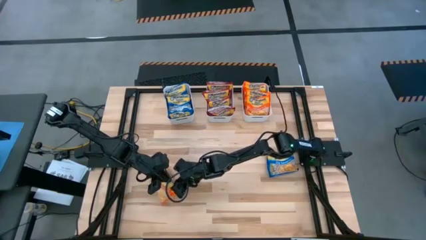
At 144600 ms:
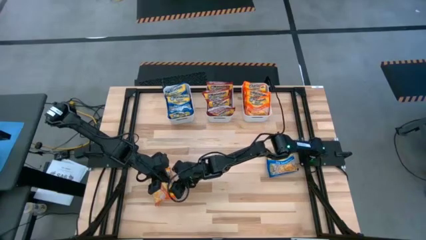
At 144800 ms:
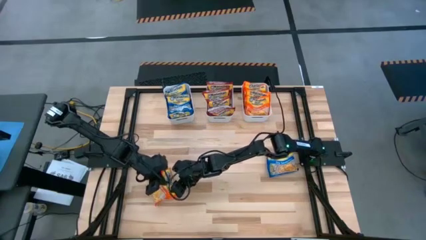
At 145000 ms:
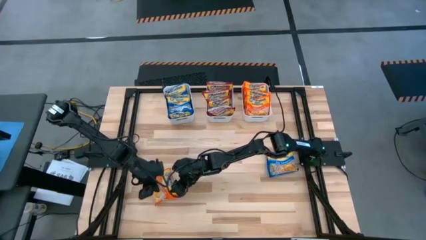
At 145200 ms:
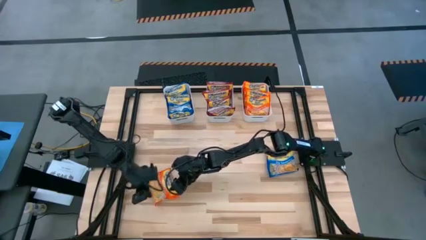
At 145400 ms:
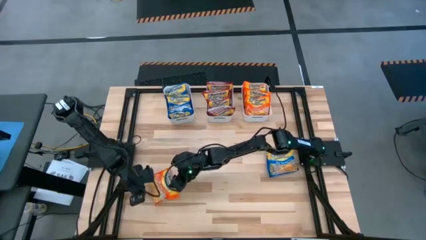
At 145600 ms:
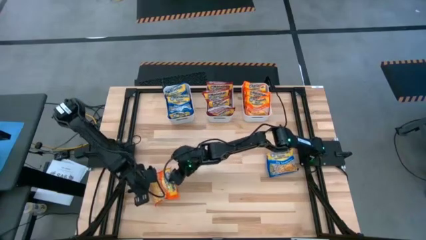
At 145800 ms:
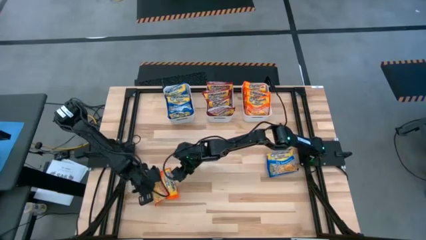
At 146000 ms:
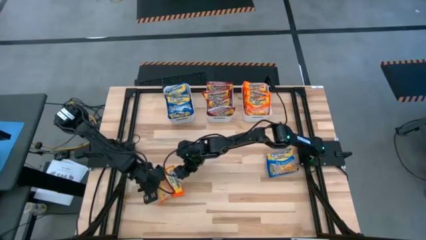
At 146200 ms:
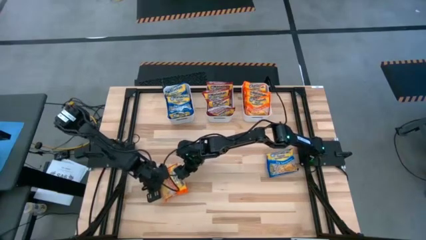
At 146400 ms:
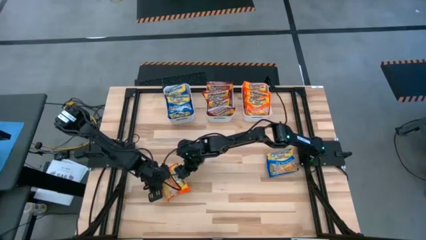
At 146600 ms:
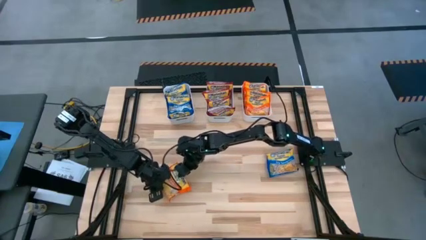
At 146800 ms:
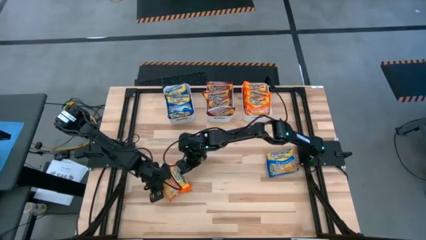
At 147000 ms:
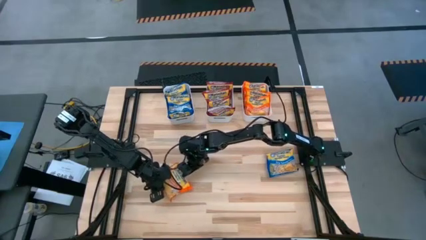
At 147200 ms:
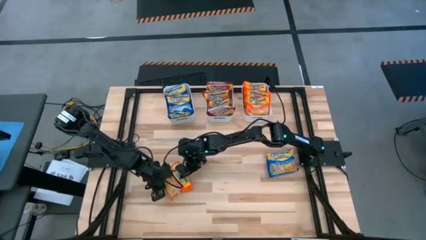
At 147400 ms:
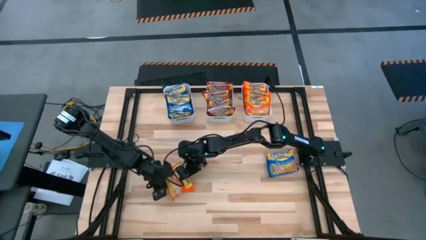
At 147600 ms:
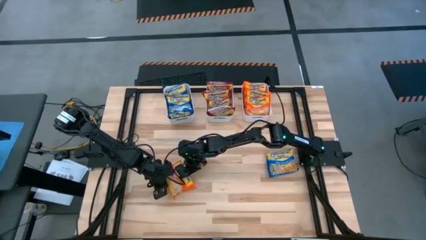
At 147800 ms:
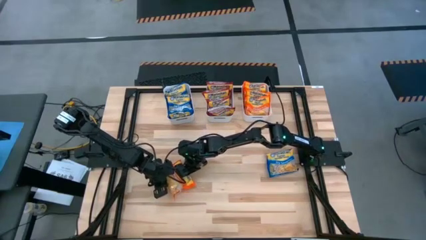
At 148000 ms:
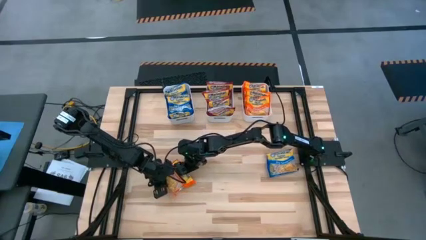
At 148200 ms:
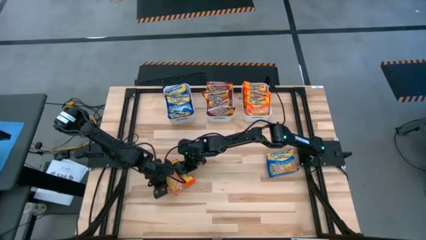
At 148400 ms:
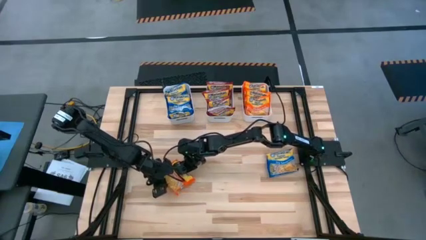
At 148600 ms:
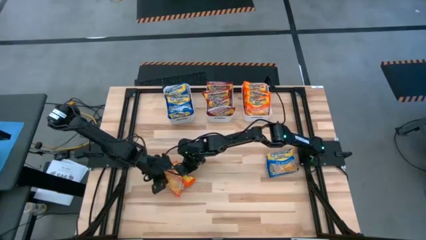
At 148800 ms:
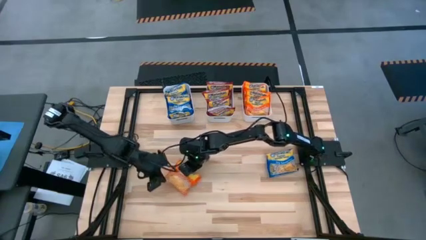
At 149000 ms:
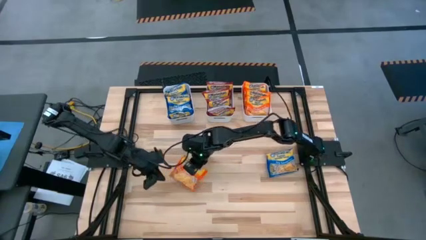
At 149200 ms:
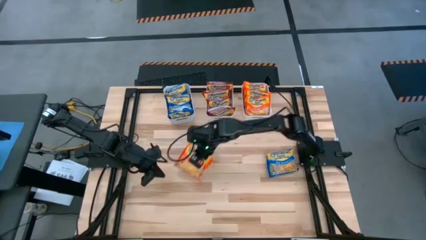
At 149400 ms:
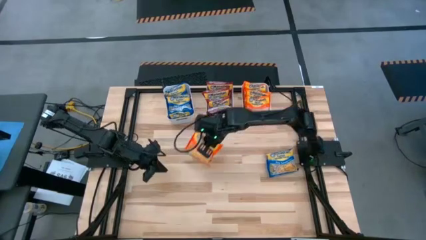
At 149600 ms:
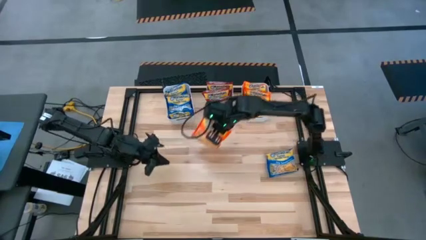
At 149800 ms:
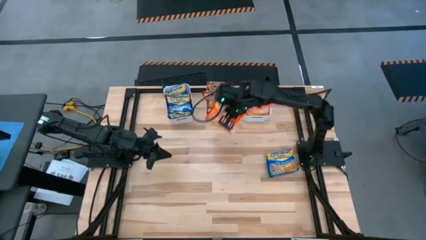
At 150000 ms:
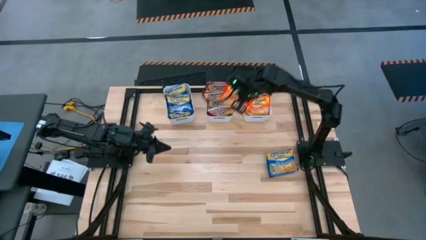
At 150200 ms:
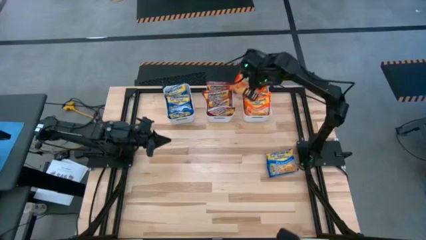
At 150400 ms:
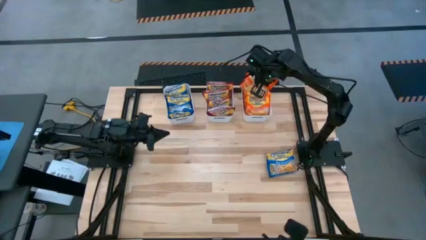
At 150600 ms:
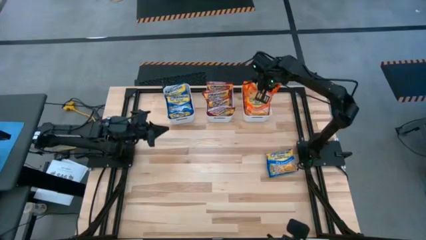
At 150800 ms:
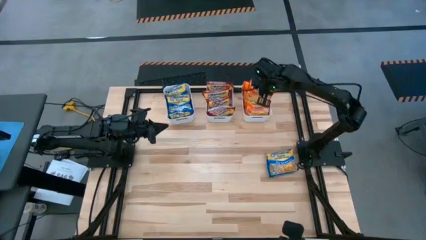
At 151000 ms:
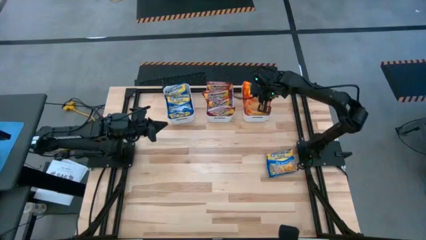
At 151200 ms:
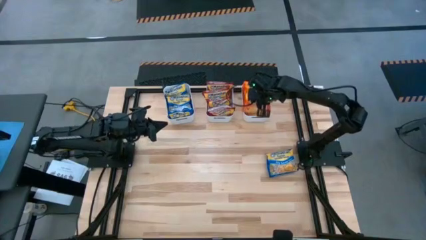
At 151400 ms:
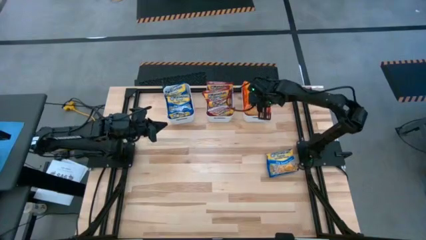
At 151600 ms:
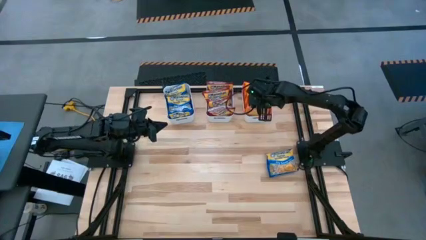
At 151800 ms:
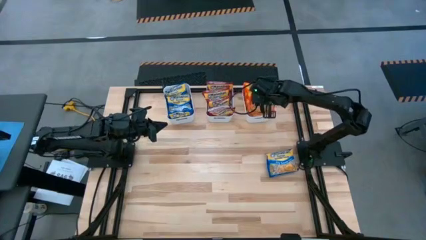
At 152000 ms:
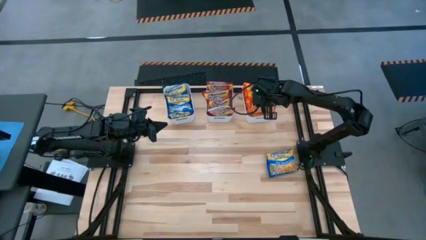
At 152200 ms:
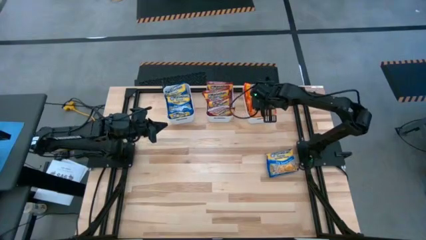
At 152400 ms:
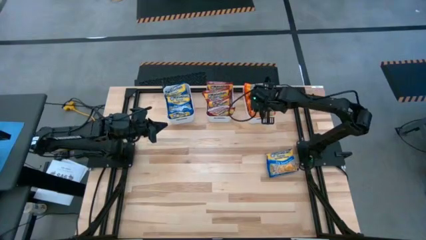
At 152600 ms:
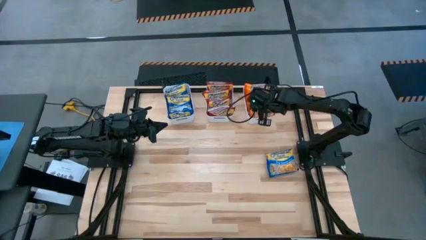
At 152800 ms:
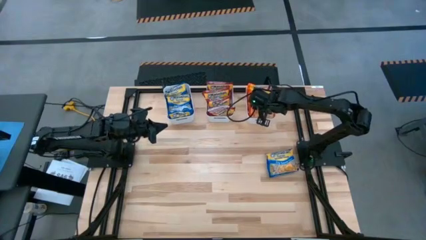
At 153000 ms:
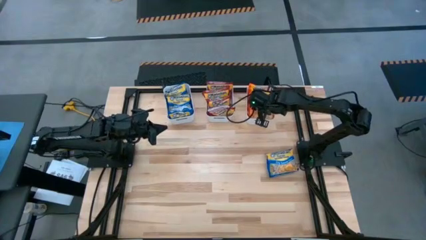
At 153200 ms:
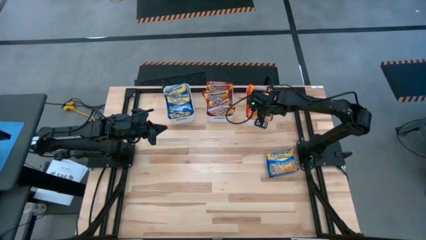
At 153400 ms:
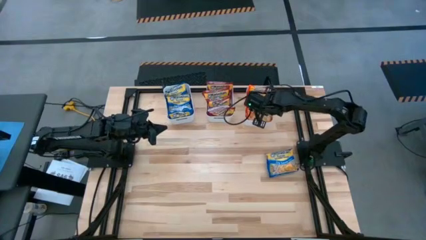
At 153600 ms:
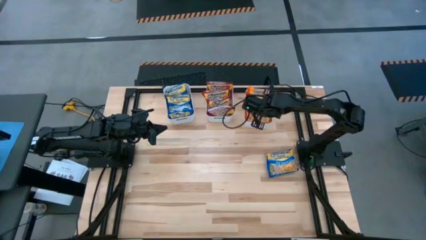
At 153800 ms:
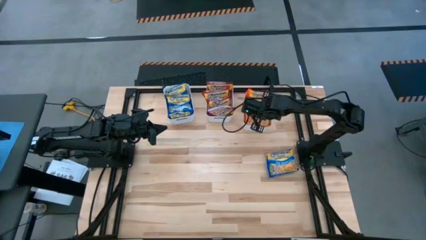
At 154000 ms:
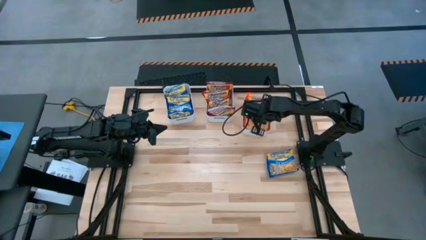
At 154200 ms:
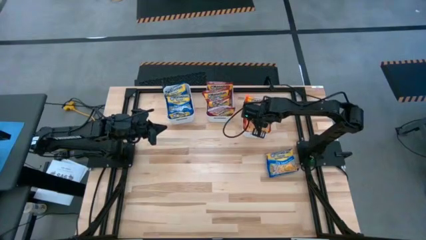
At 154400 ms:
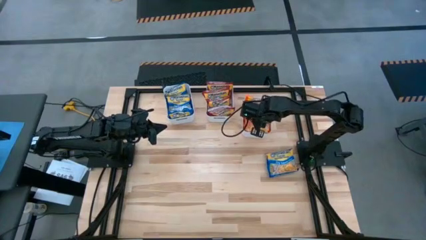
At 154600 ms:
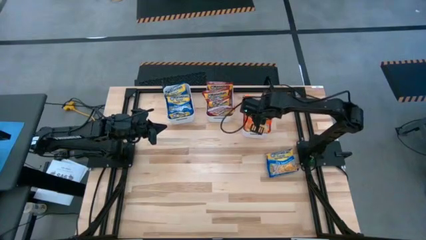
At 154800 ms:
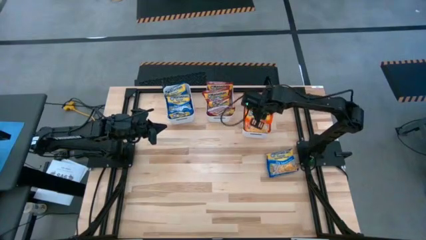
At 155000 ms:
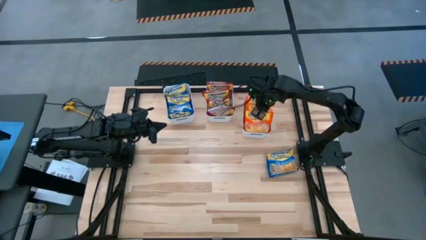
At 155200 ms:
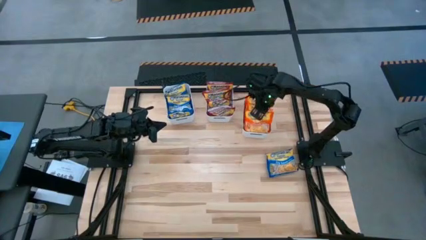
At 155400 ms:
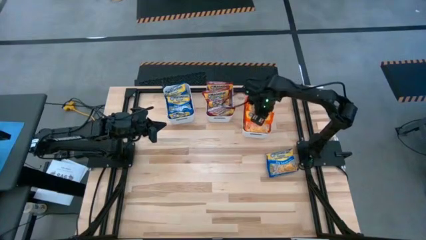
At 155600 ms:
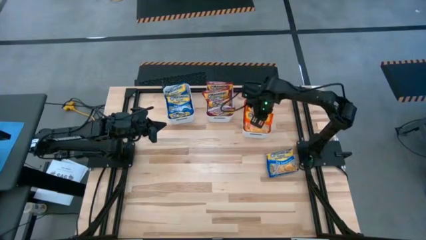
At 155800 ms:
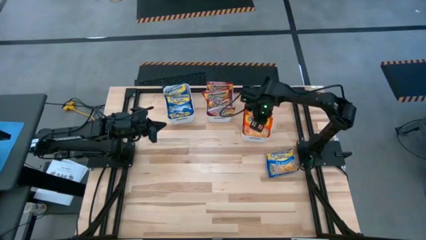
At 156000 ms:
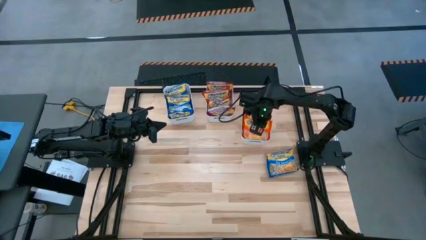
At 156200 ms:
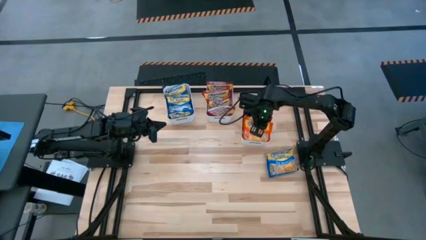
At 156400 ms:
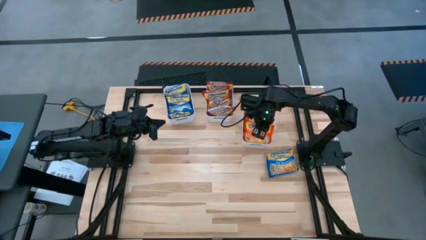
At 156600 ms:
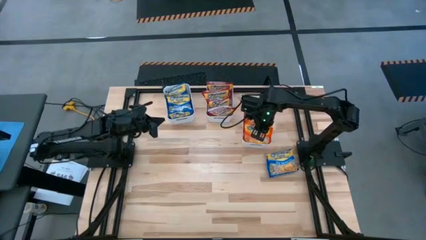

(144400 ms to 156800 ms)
Task: Sort Maruchan noodles
Put the orange noodle pack into the right white bin

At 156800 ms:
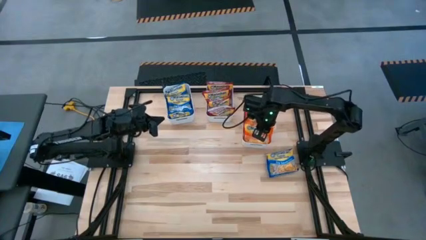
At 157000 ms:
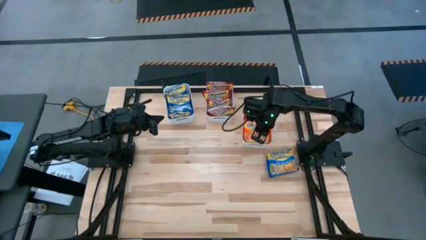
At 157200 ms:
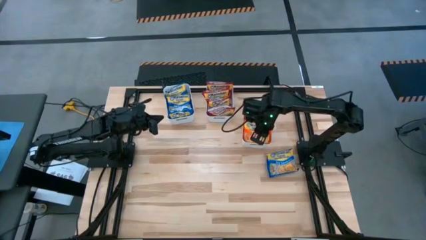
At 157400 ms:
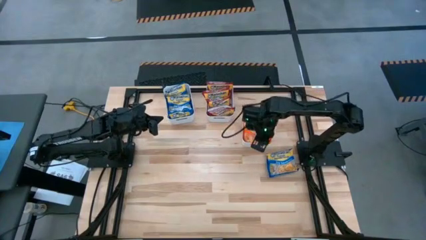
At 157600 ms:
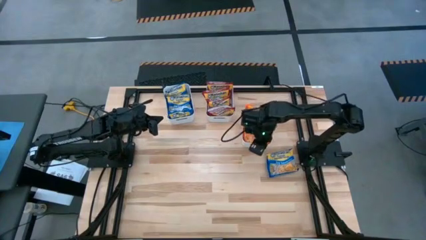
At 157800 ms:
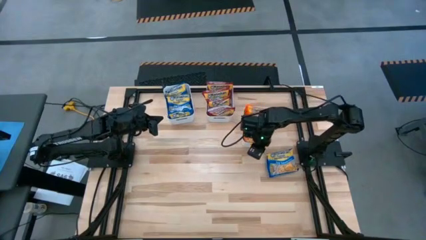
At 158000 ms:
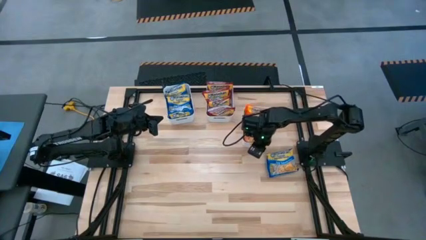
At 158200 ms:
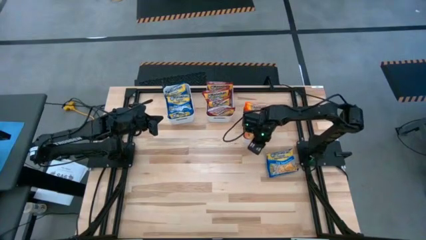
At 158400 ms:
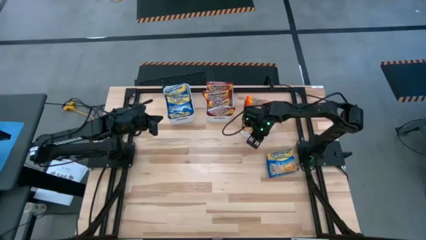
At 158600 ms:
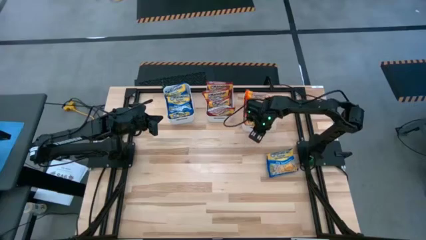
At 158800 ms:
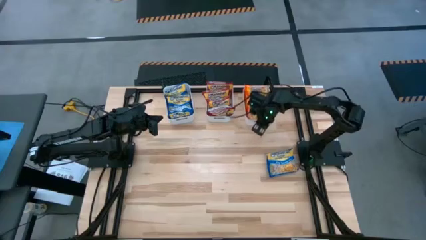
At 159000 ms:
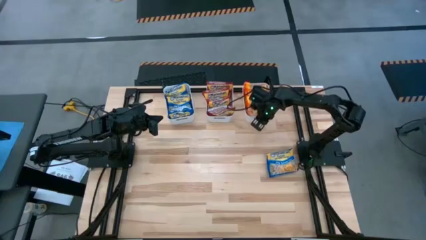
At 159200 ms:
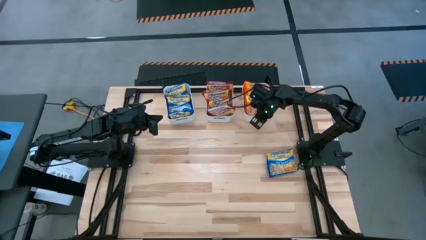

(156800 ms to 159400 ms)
Adjust the right white bin
